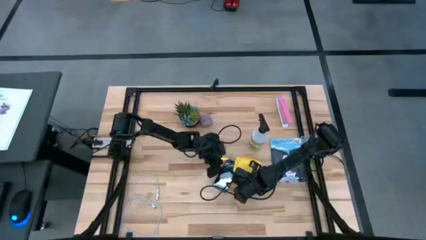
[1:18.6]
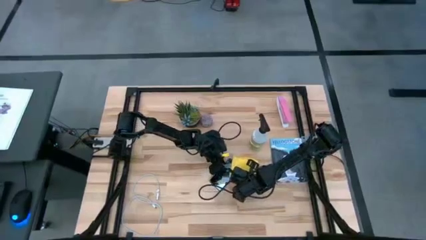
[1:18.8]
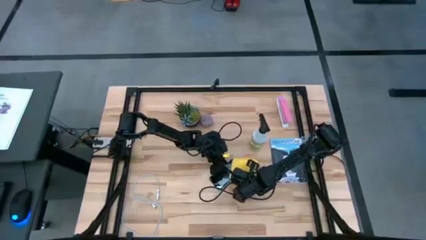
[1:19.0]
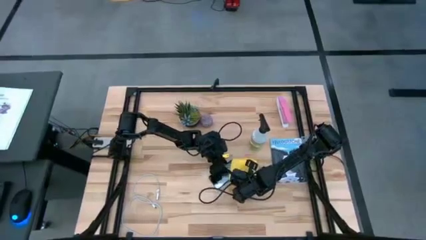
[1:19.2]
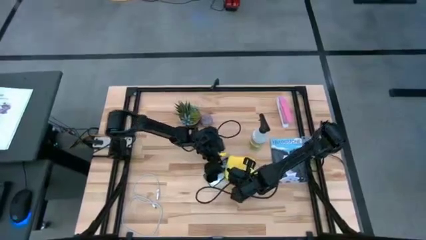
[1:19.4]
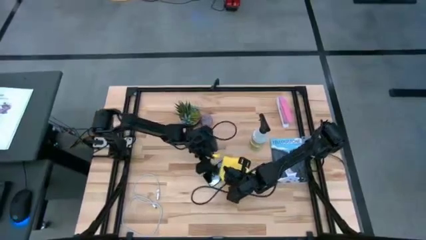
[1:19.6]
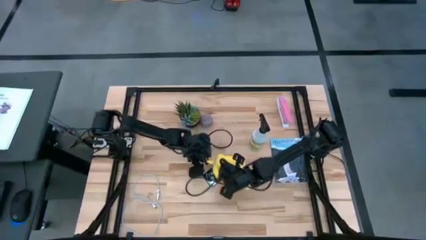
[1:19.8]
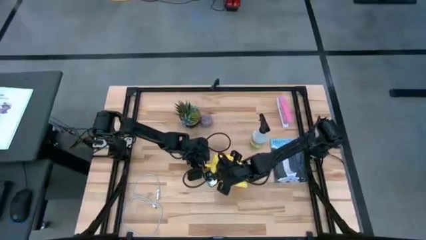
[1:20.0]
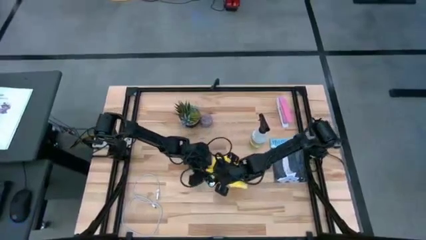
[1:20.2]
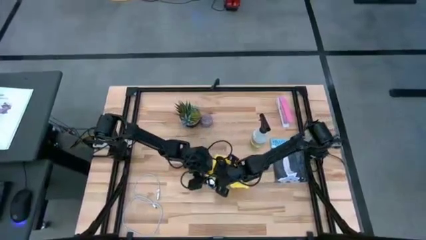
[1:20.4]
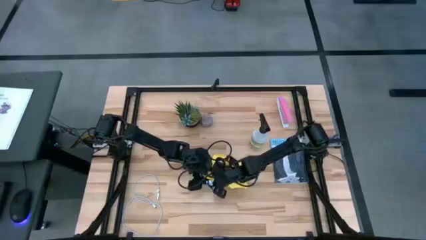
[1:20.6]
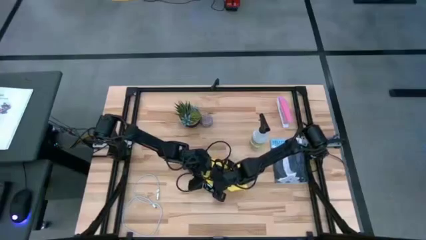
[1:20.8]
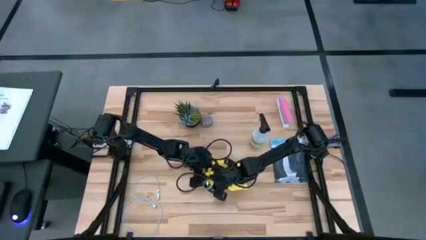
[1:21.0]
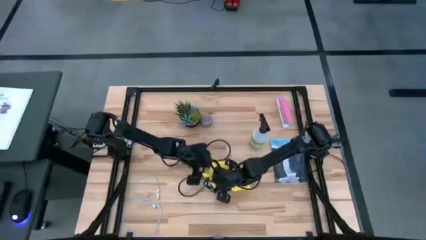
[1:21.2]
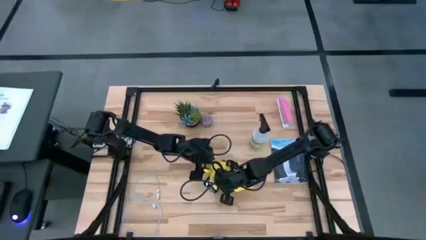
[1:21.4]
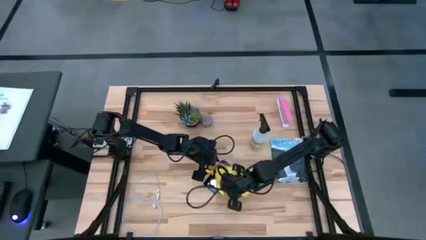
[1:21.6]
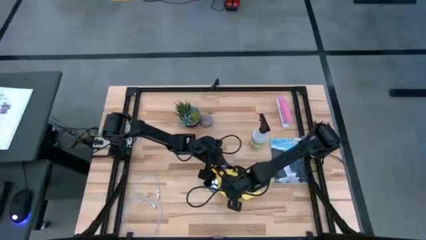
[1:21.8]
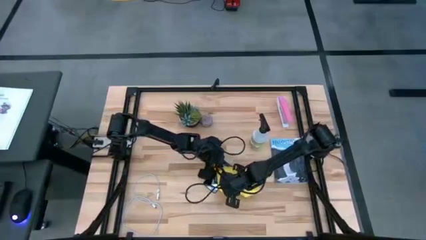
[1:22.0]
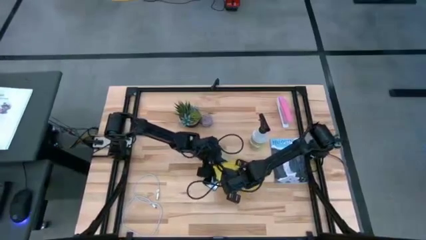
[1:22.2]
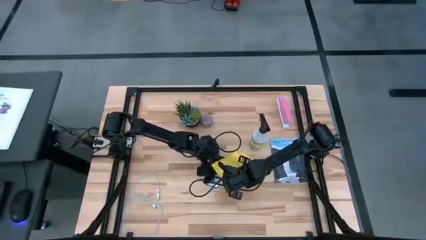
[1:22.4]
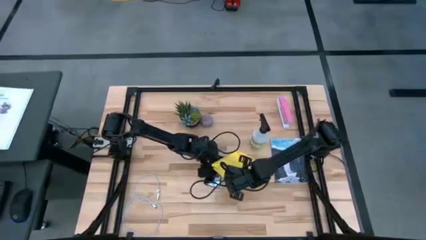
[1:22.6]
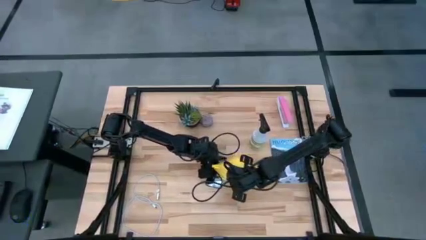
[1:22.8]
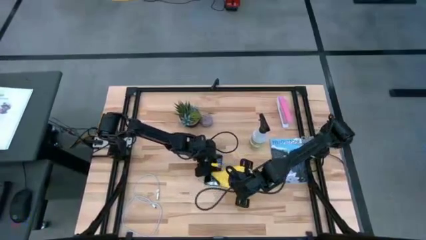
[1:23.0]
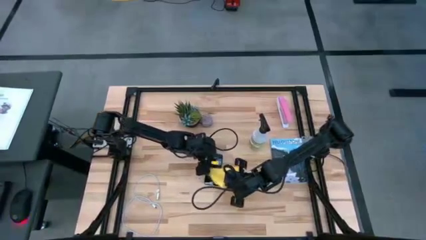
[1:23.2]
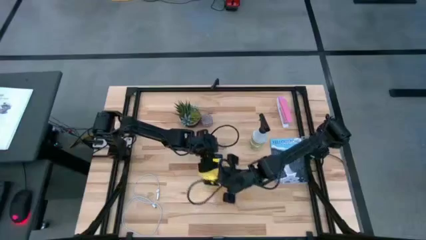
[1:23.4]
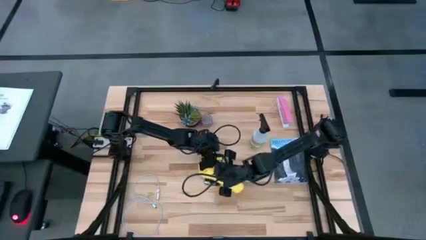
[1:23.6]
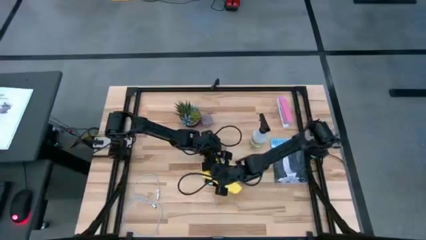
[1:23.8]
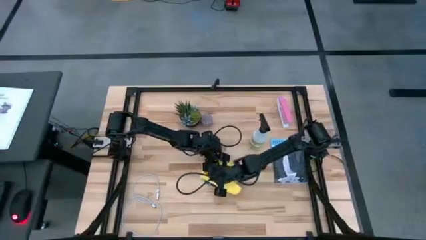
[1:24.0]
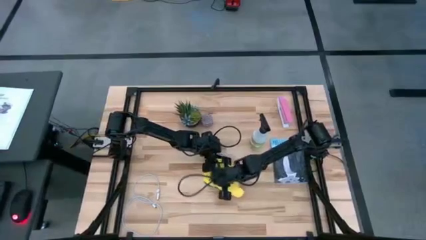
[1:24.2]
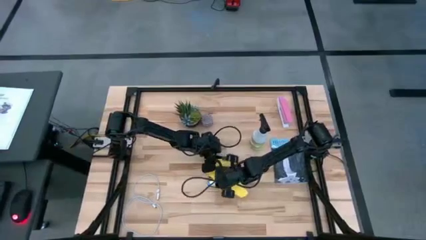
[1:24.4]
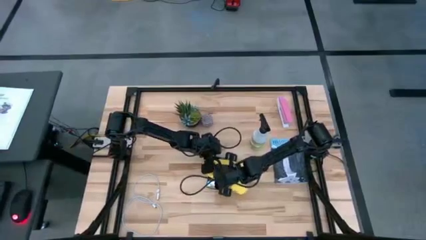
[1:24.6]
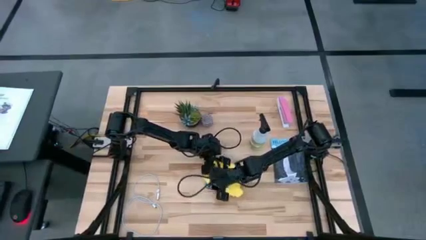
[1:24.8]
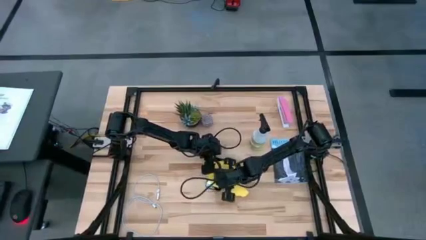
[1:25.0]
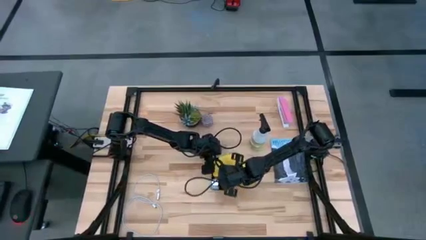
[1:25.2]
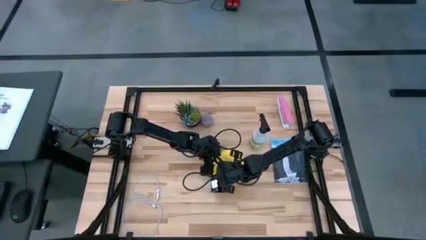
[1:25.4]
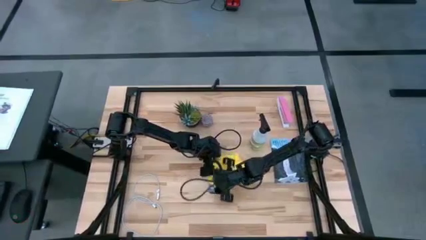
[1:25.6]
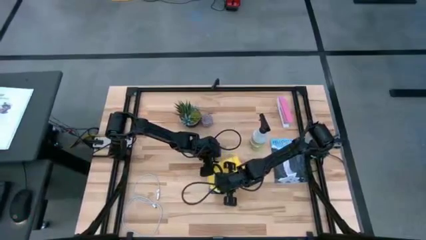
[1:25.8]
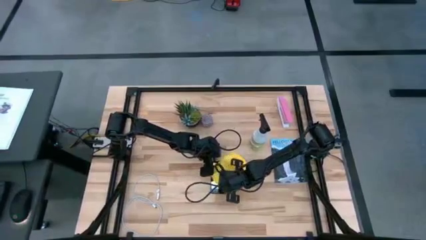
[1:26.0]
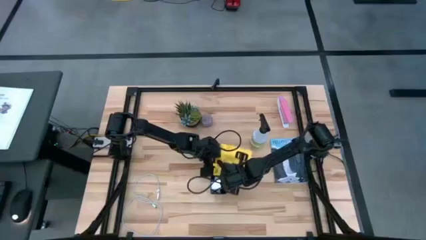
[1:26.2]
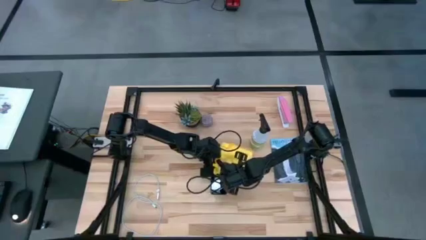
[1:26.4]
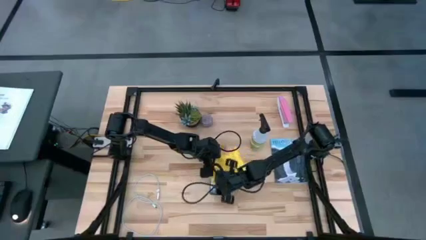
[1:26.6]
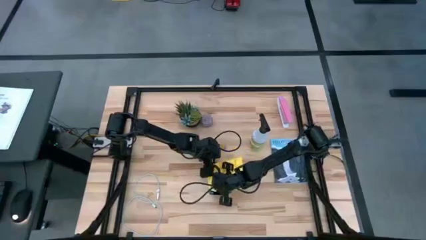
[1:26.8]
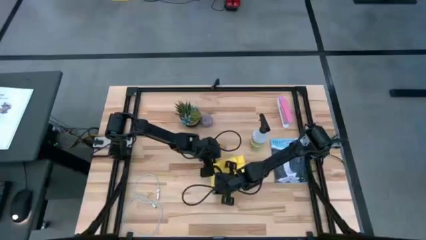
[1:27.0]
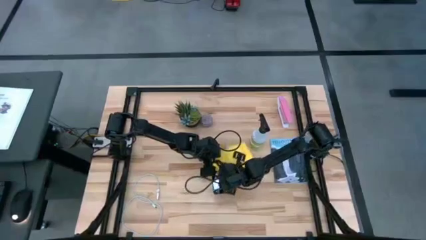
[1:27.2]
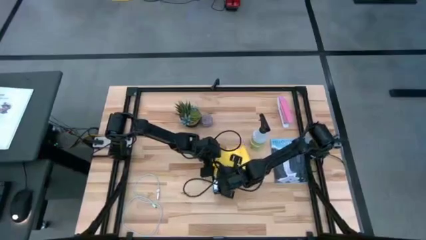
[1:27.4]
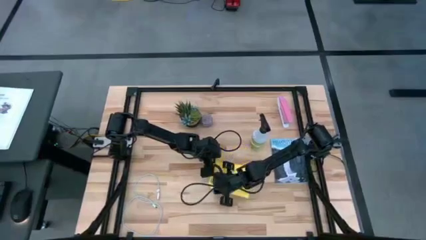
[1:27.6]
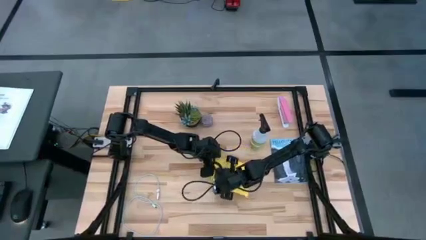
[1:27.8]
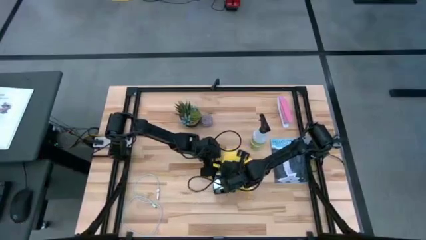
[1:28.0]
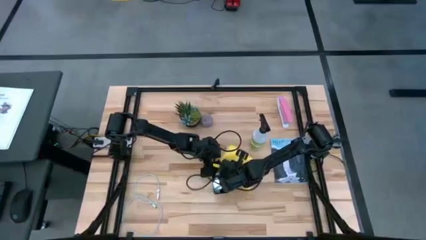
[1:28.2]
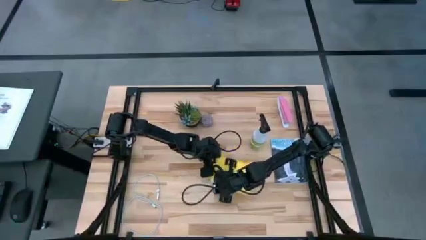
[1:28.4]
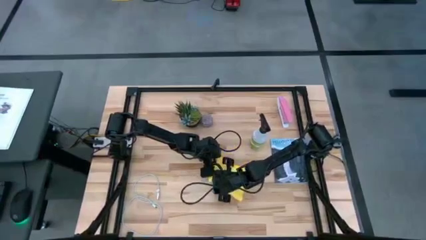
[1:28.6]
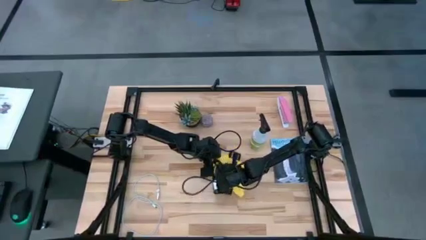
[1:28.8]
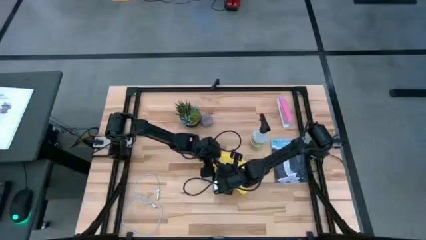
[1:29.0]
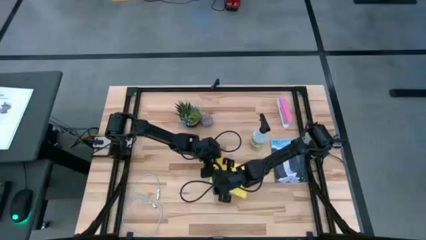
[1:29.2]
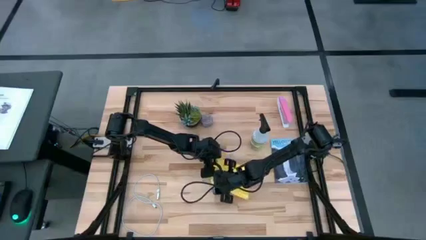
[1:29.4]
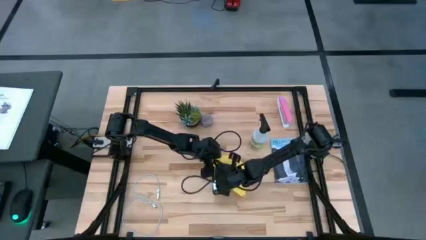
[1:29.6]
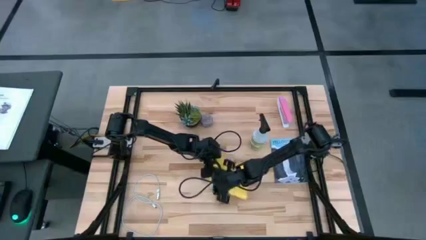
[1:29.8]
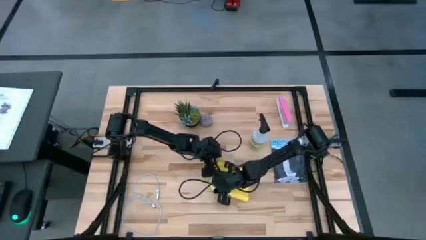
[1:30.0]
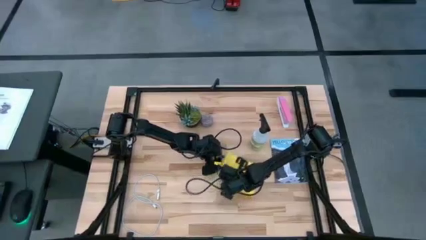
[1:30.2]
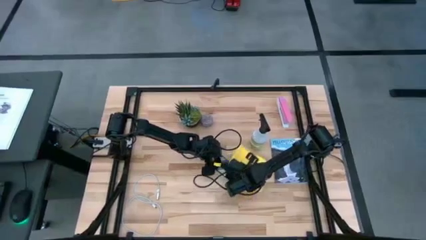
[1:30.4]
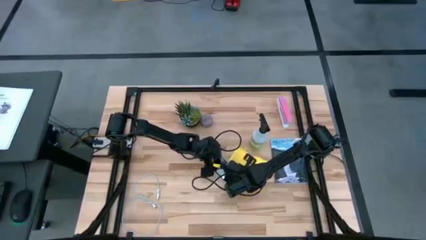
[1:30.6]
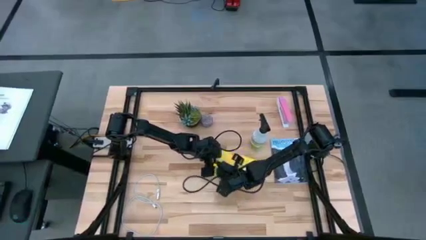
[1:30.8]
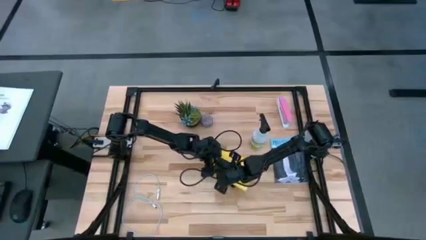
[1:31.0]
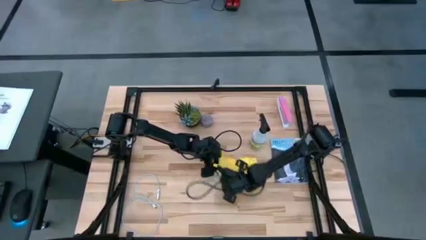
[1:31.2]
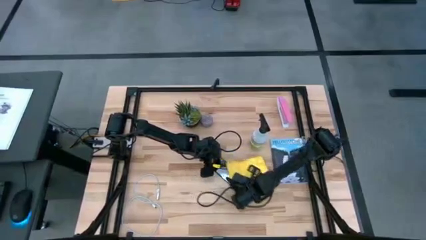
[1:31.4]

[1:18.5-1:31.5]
Task: Apply microfiber cloth
Wipe the front side of the cellphone using the yellow microfiber cloth
